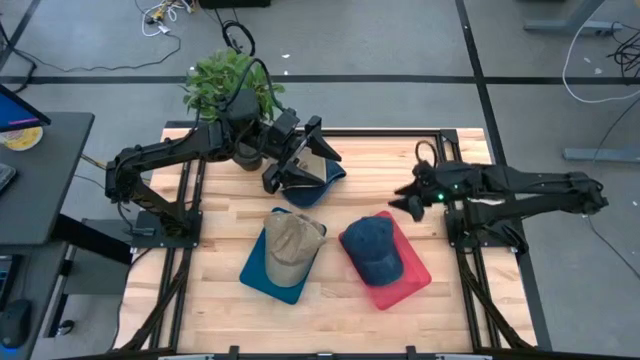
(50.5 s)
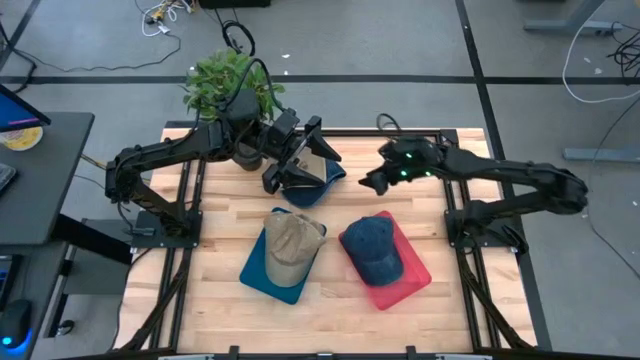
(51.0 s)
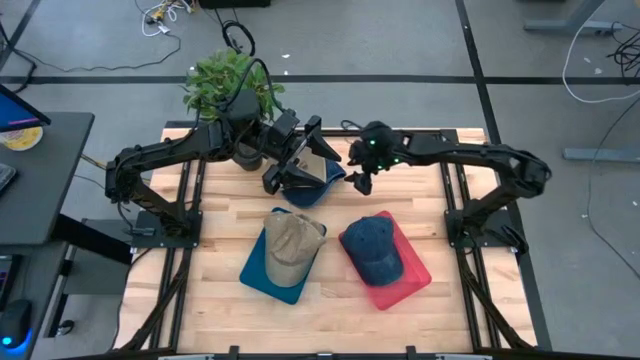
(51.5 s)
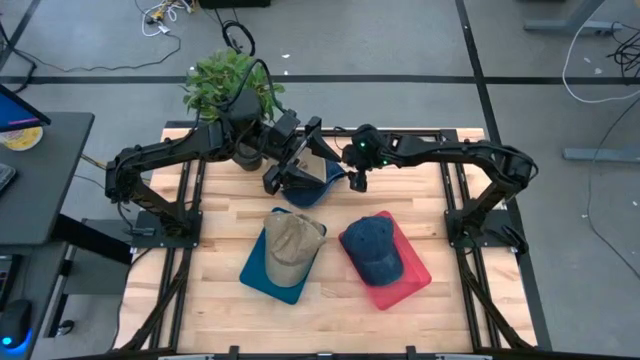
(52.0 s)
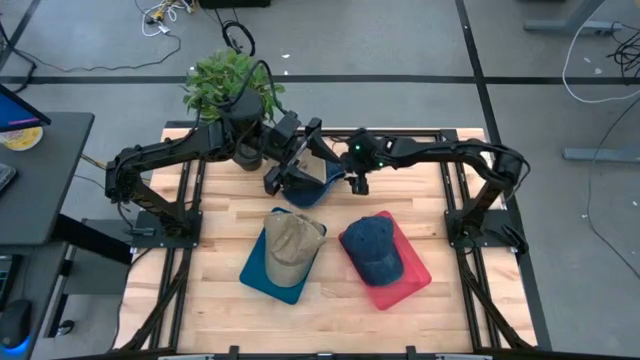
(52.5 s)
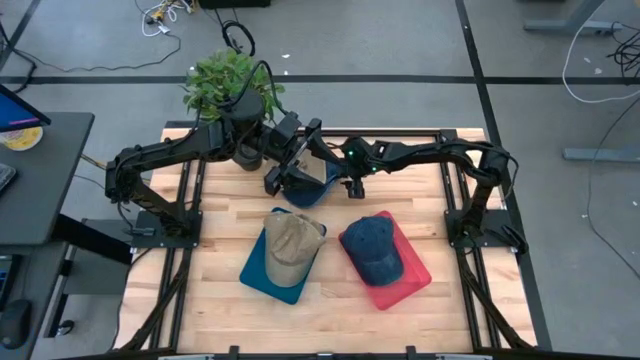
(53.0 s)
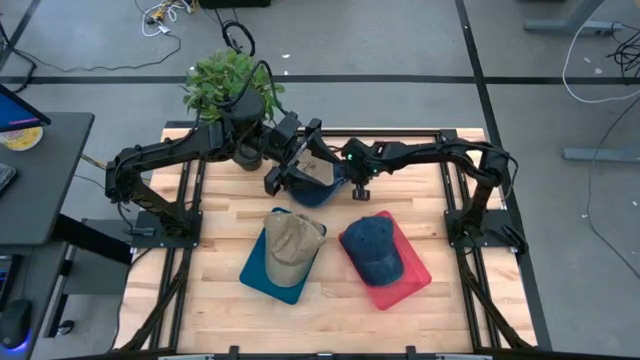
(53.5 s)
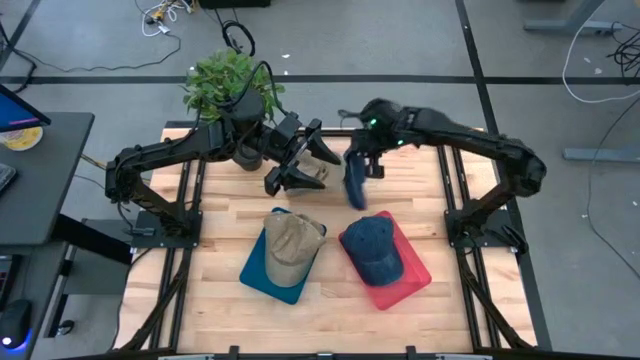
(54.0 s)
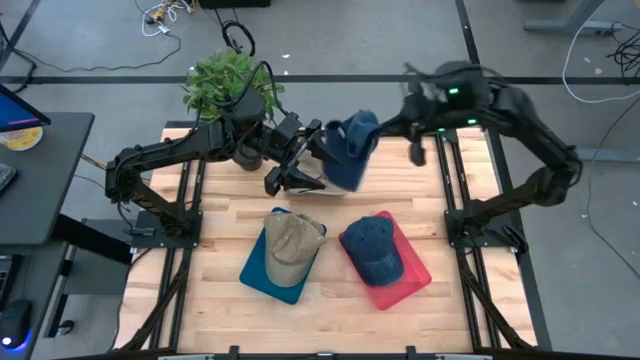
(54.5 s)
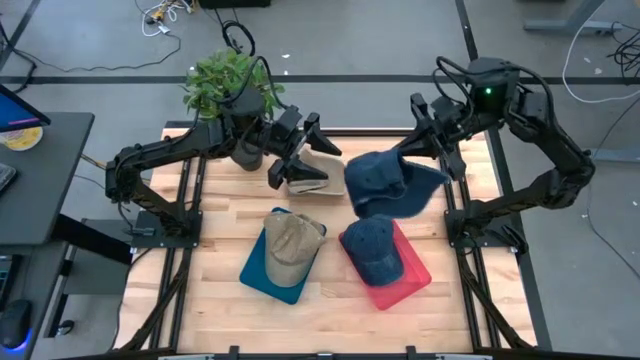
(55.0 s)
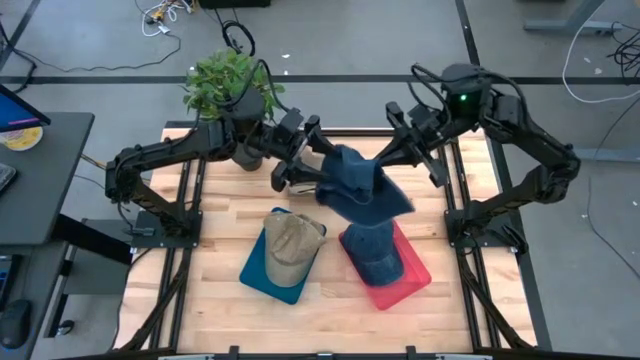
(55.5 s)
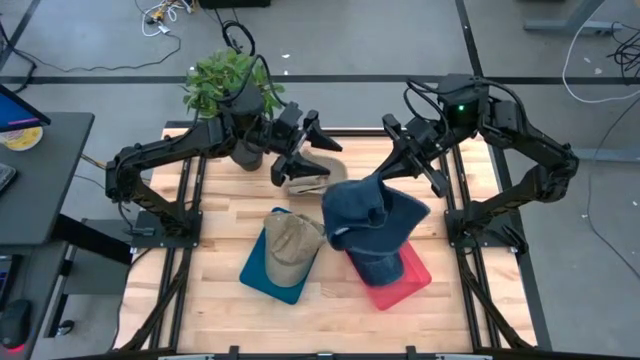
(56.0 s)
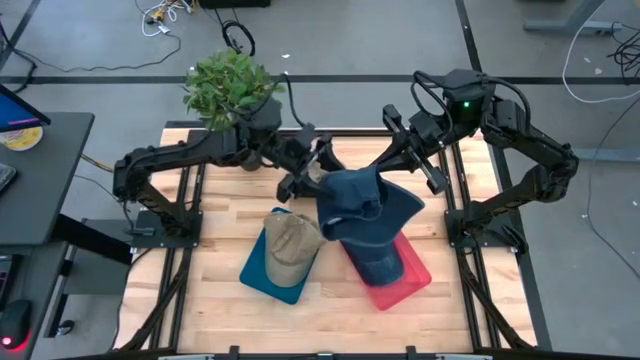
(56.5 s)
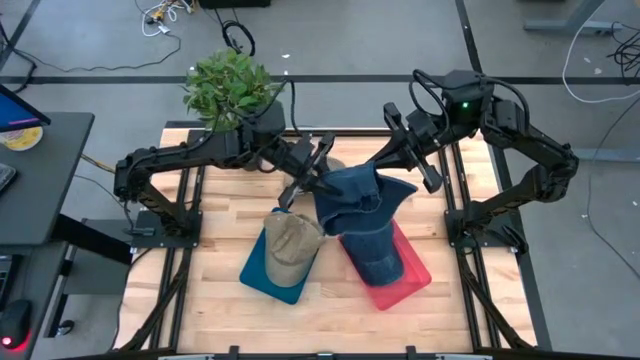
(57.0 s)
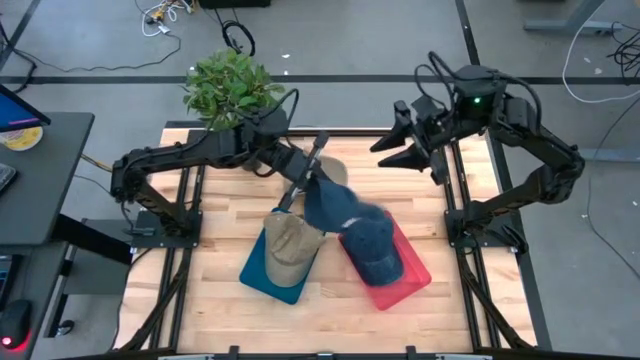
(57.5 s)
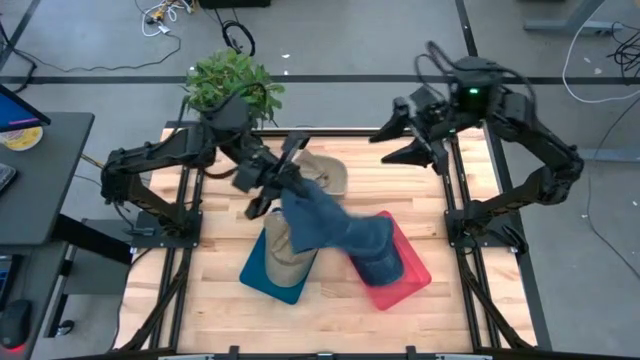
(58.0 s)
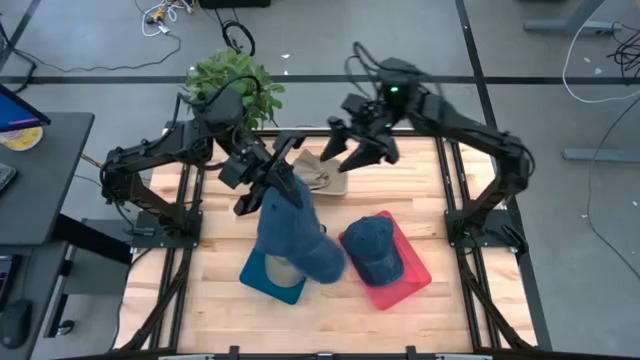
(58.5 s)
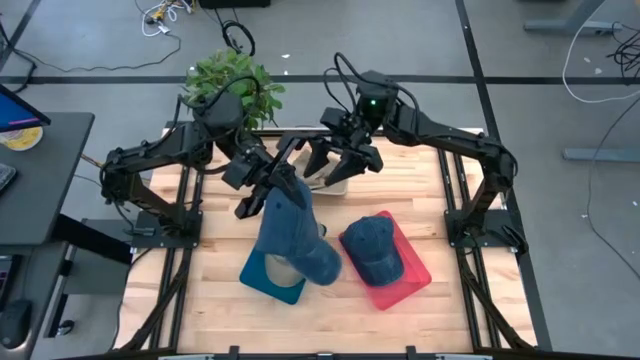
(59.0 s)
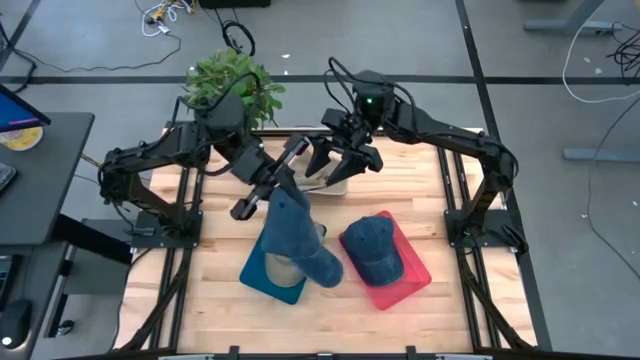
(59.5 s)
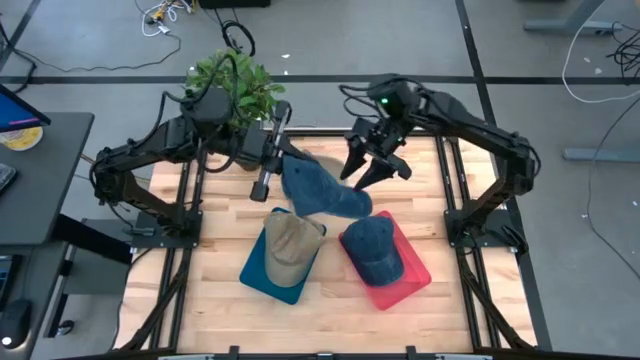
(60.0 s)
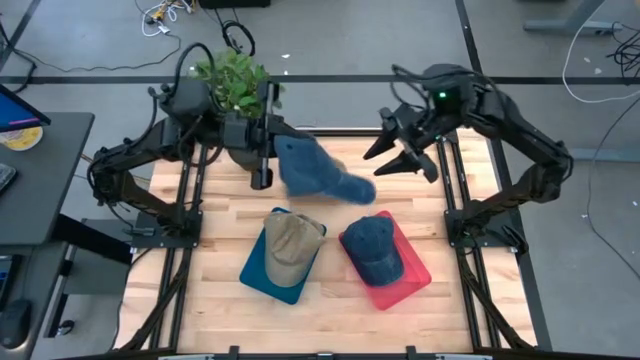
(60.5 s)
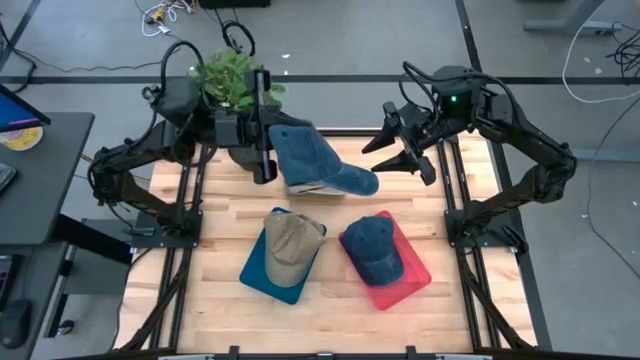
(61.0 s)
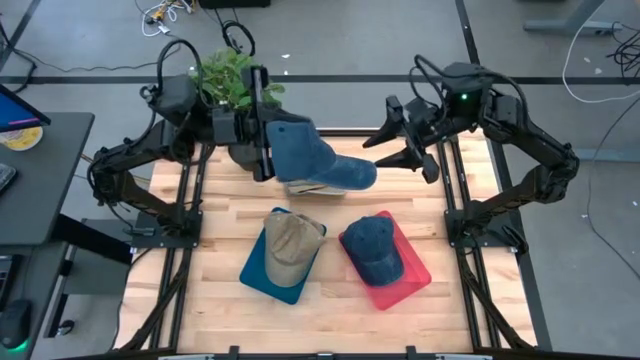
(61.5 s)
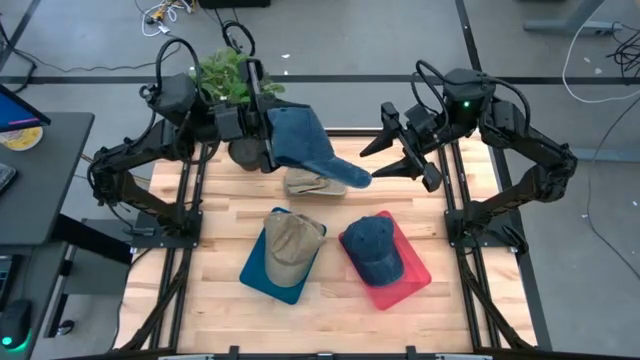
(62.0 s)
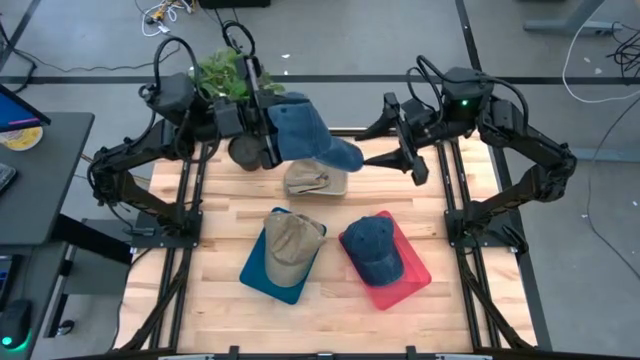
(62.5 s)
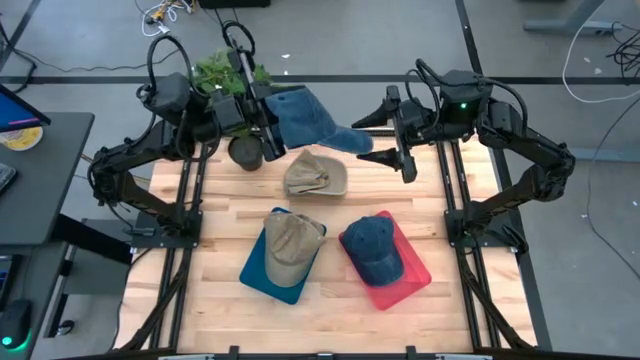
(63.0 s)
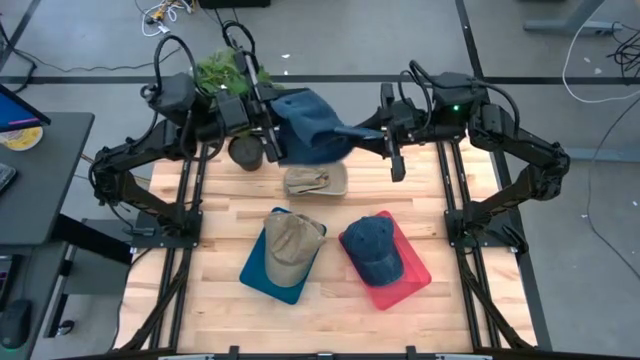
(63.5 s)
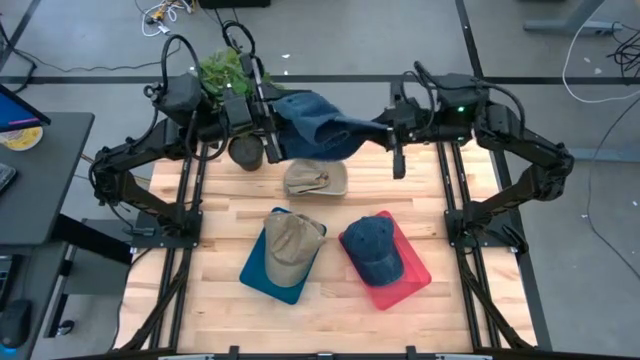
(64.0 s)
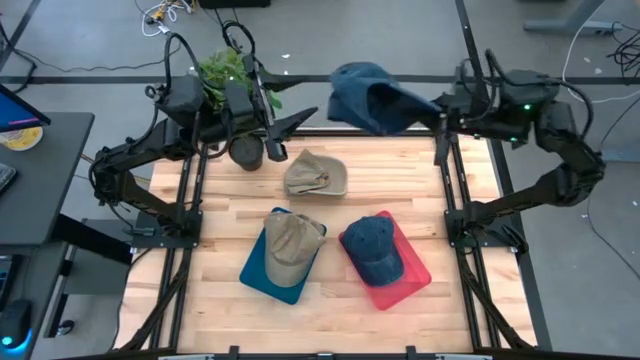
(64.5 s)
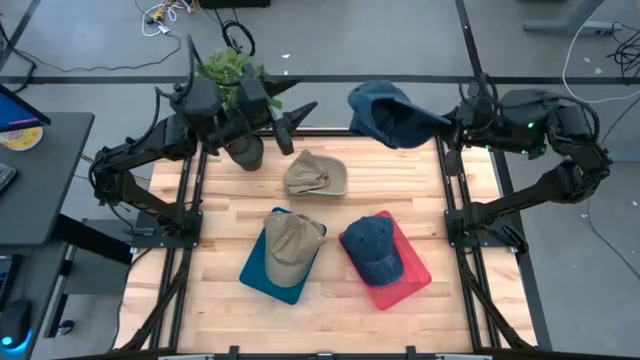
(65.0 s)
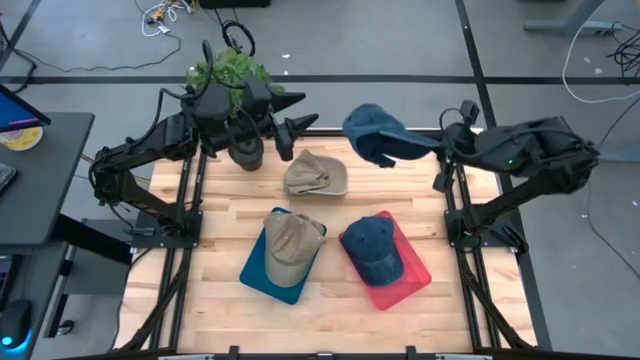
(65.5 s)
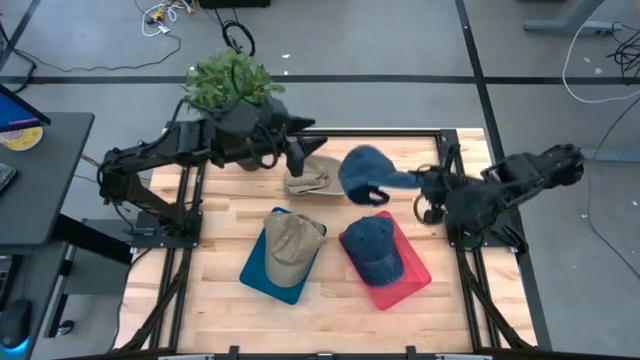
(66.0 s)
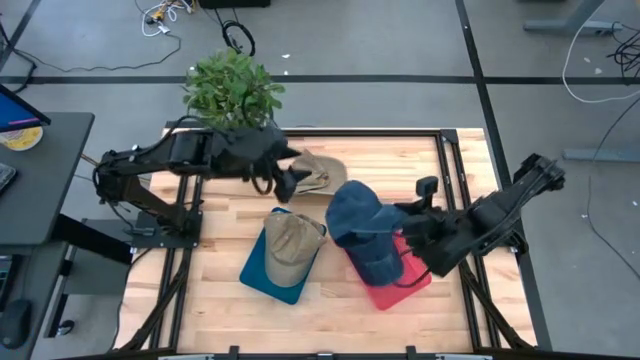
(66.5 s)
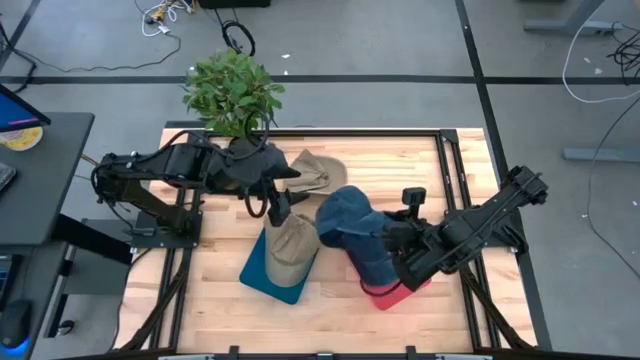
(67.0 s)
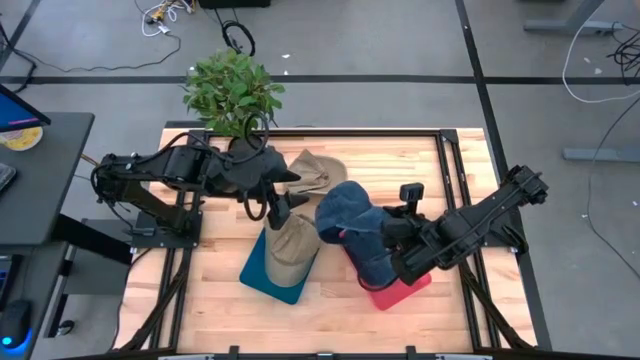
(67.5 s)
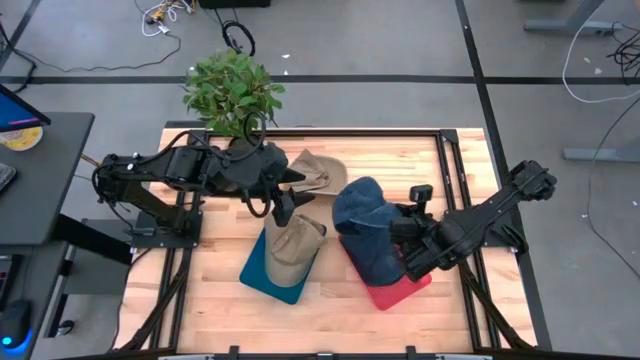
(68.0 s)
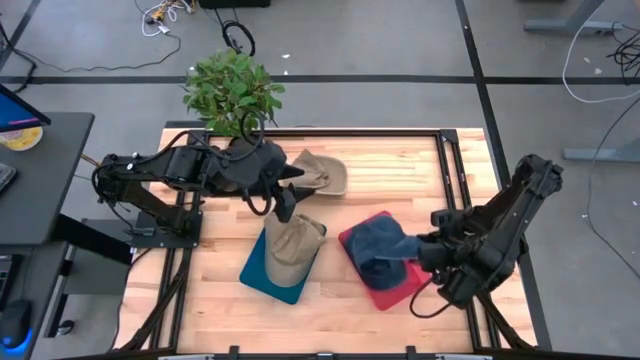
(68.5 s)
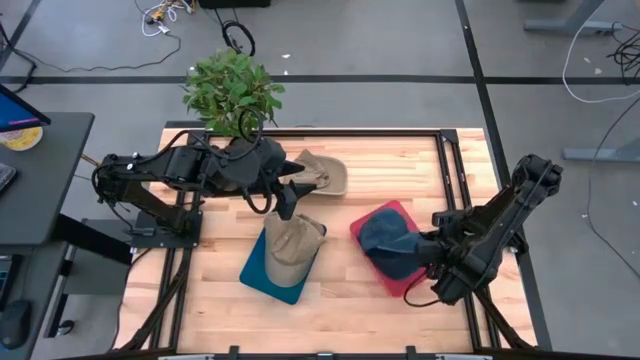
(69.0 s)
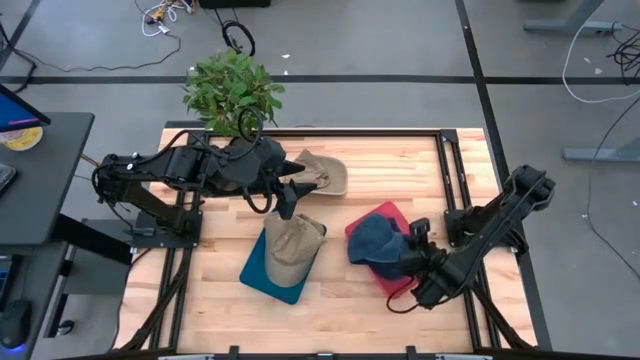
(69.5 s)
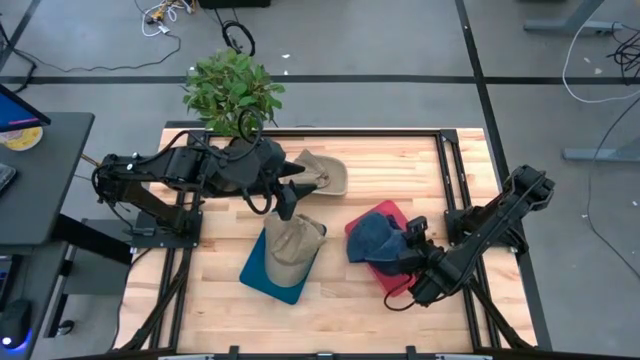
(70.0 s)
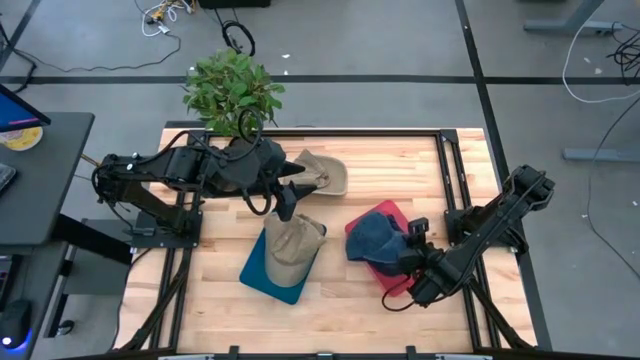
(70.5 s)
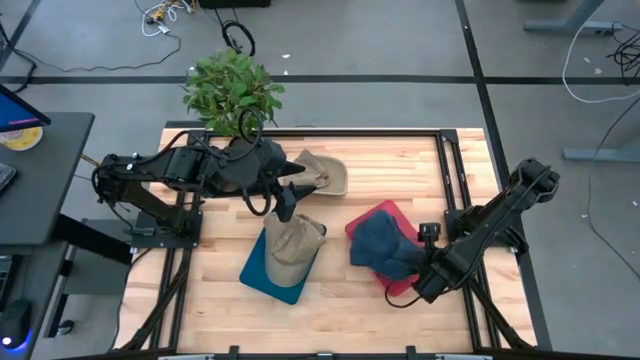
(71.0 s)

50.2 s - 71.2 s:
Task: Pick & Place hat
Put the blue cap into the pink bin

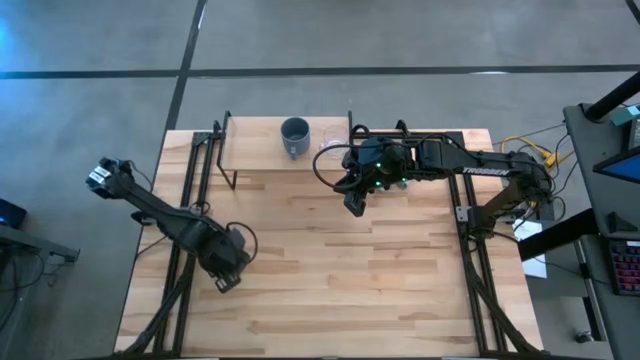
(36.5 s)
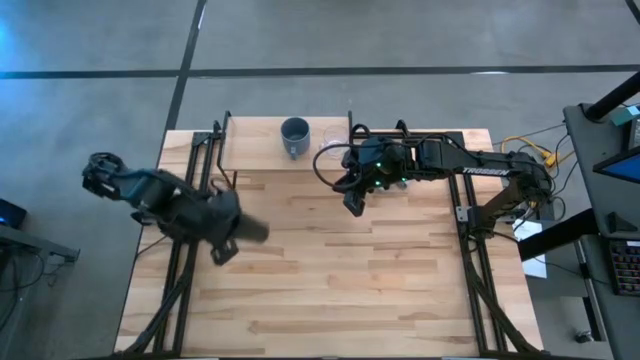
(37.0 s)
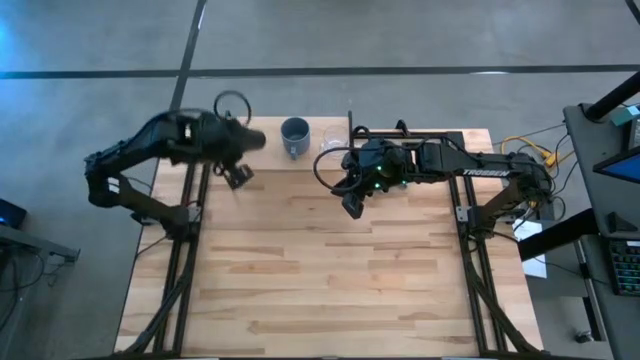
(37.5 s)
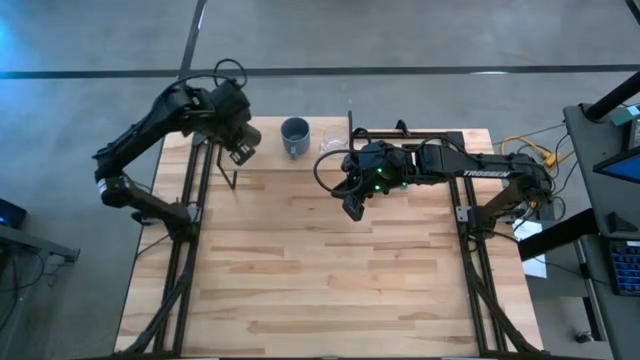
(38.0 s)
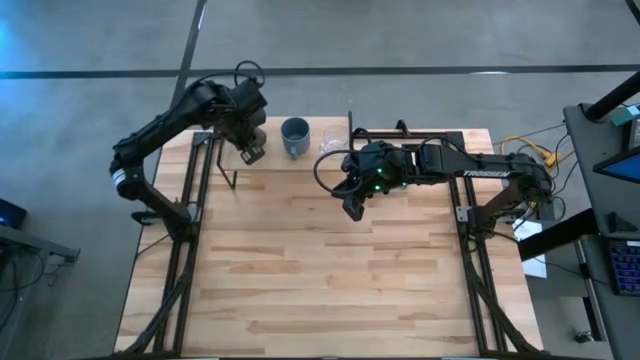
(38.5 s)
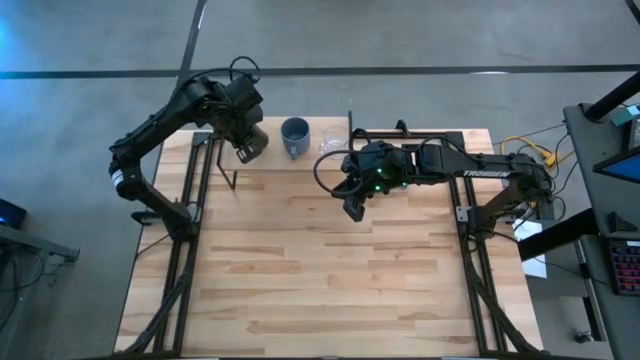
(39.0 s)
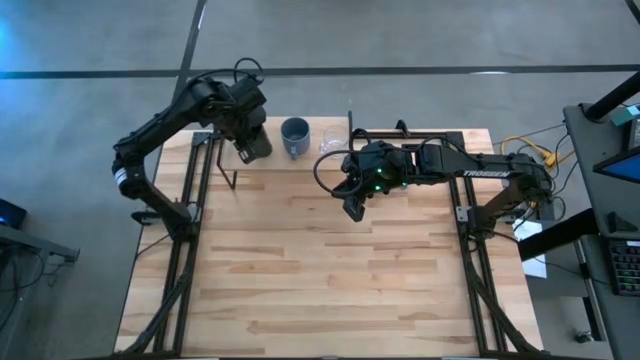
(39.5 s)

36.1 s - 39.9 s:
Task: Stack small to large cups/mugs on shelf
Put the black cup on the shelf
